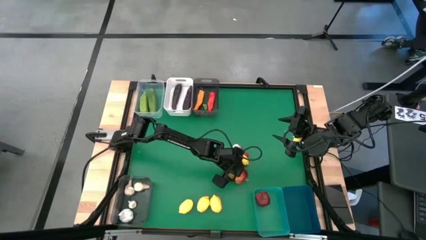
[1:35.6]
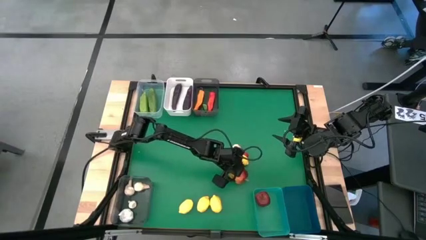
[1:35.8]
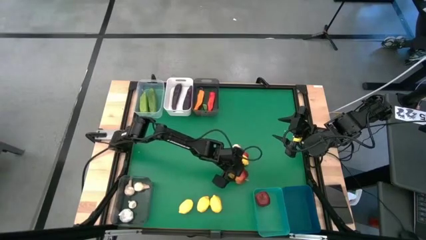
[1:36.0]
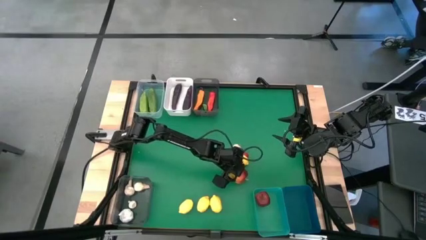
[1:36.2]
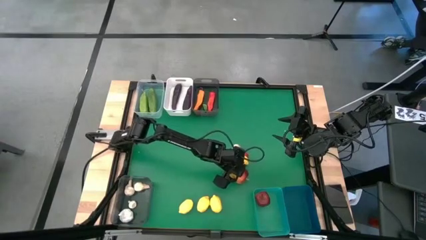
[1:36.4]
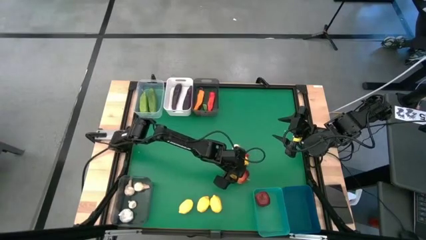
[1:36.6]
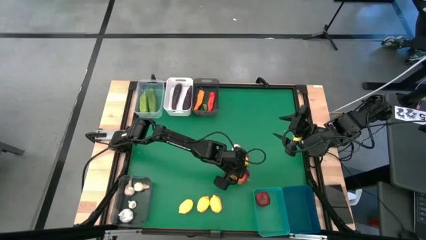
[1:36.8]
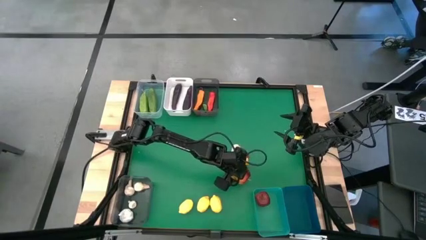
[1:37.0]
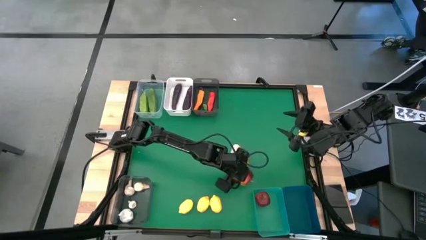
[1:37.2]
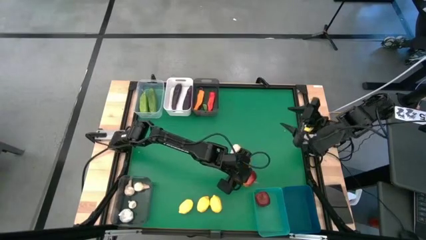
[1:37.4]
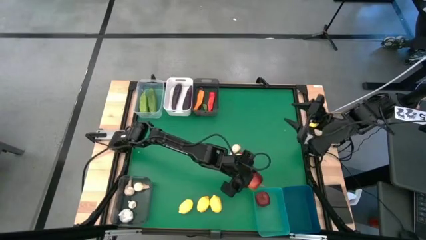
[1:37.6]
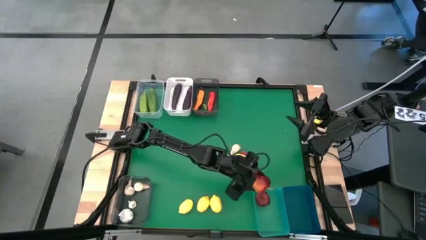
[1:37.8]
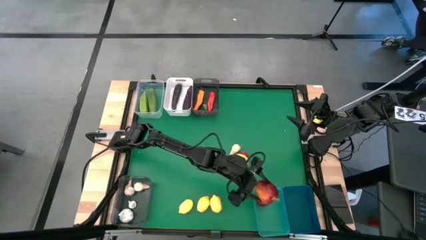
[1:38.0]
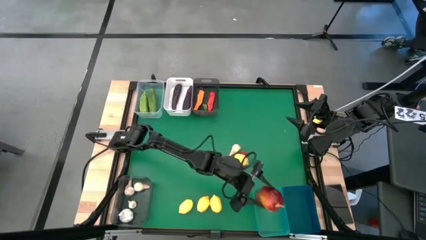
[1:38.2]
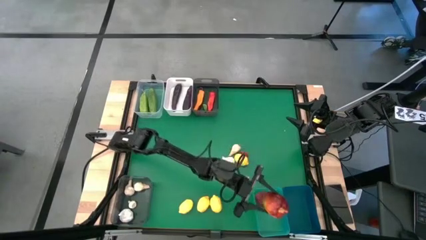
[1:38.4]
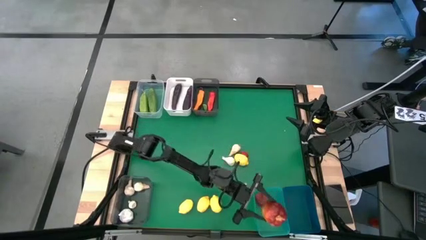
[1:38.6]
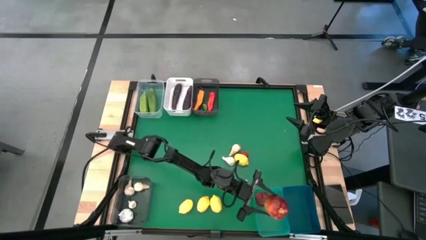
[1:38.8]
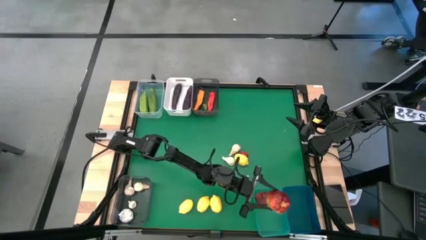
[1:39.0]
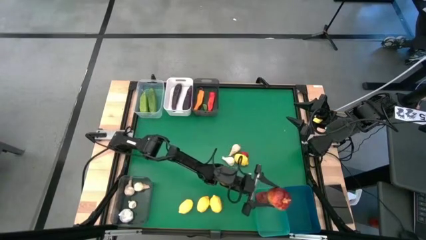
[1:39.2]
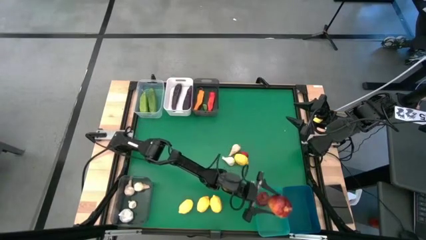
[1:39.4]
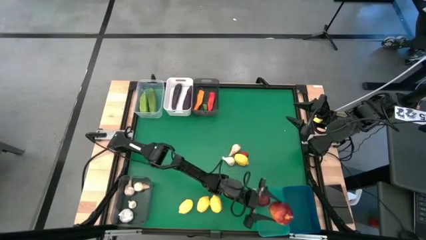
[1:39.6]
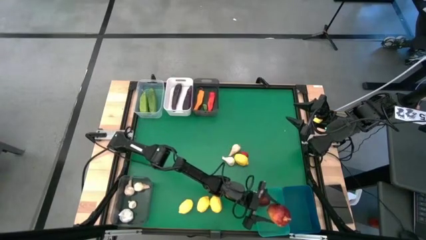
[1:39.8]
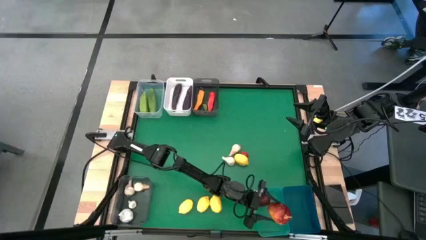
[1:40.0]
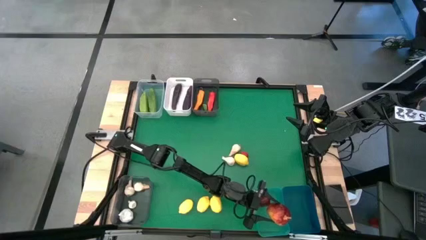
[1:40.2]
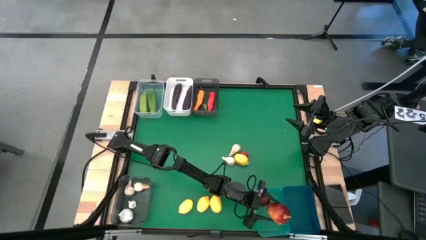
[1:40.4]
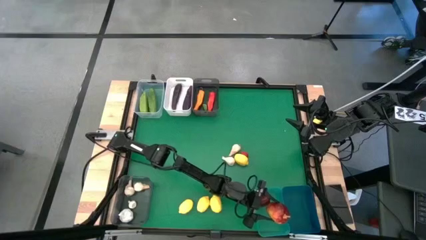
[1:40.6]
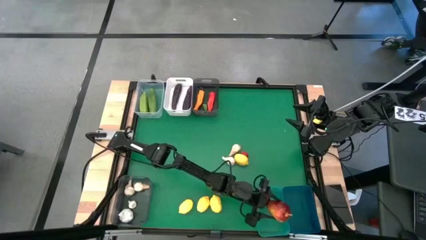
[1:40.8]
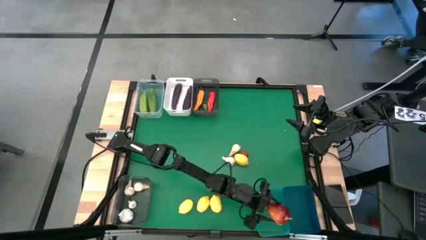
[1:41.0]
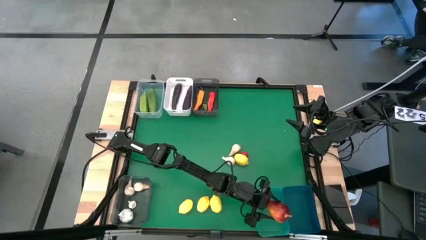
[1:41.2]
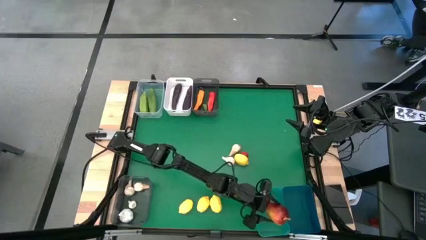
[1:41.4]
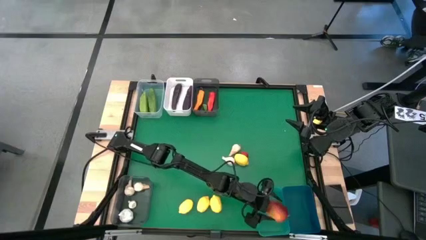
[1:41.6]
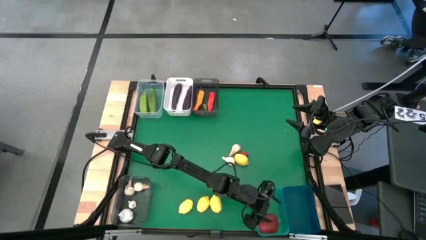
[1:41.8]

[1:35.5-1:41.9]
Task: Sort produce into baskets
Put the red apple into the green bin

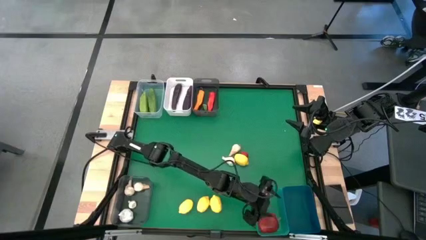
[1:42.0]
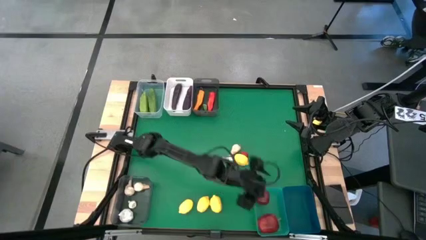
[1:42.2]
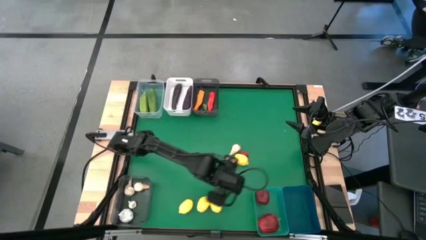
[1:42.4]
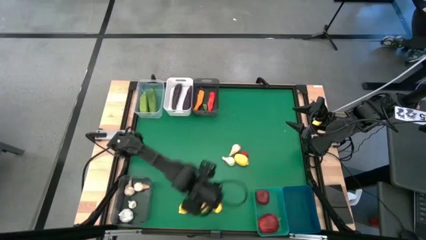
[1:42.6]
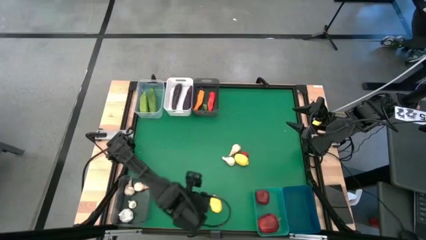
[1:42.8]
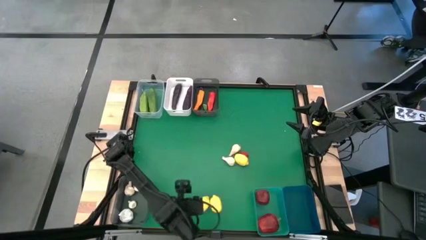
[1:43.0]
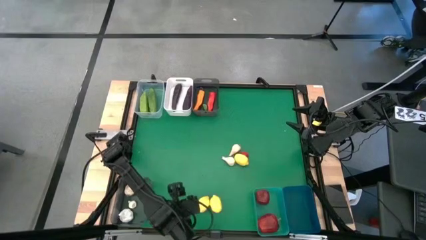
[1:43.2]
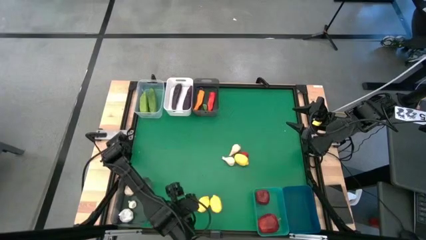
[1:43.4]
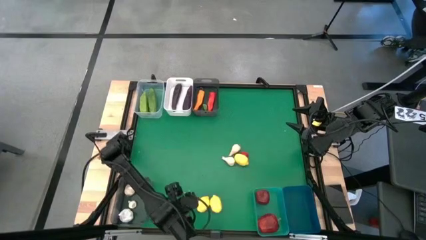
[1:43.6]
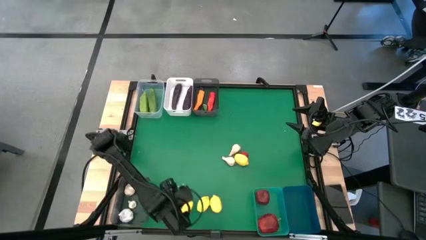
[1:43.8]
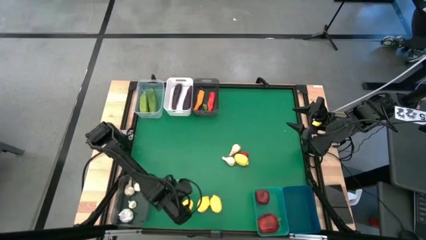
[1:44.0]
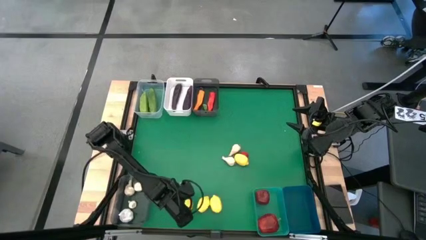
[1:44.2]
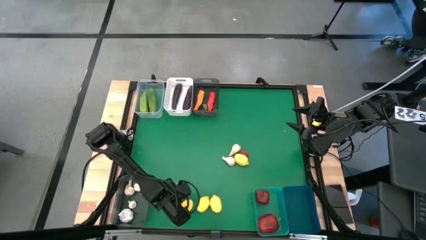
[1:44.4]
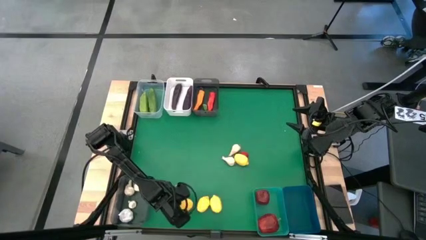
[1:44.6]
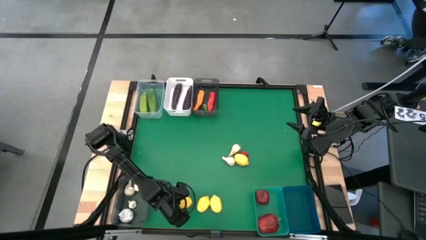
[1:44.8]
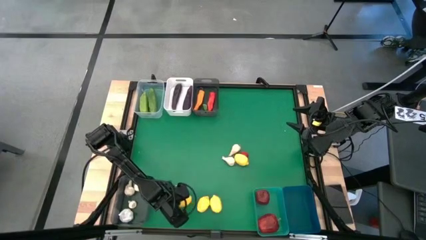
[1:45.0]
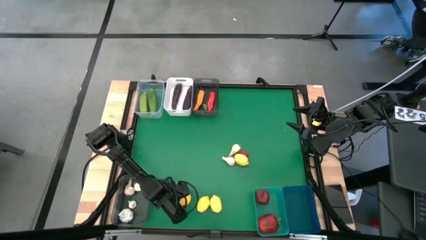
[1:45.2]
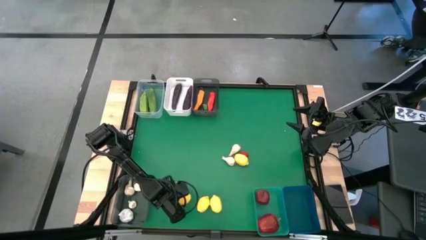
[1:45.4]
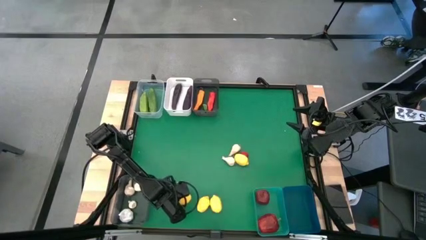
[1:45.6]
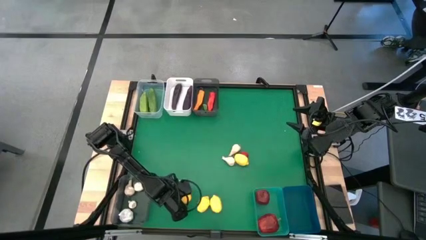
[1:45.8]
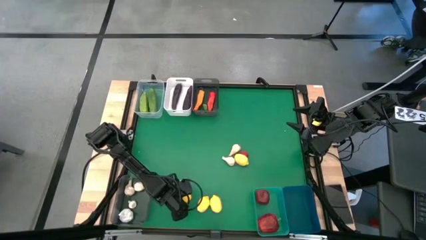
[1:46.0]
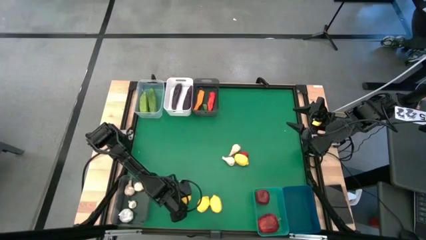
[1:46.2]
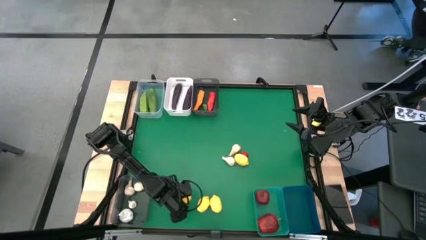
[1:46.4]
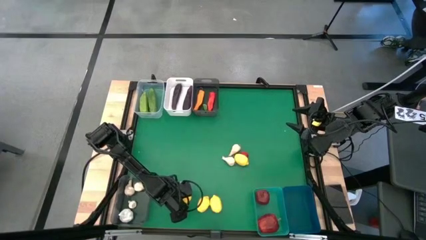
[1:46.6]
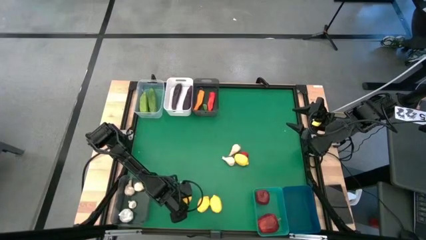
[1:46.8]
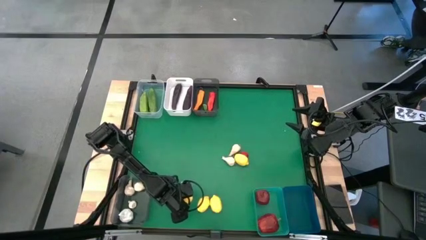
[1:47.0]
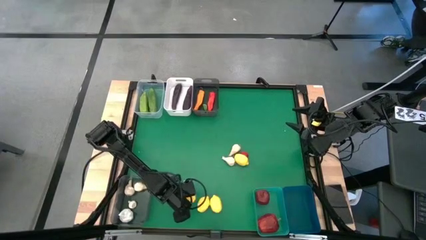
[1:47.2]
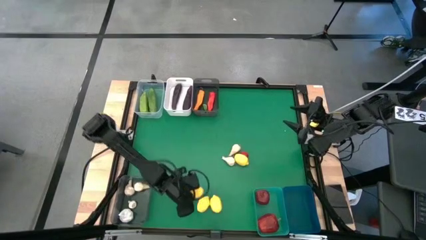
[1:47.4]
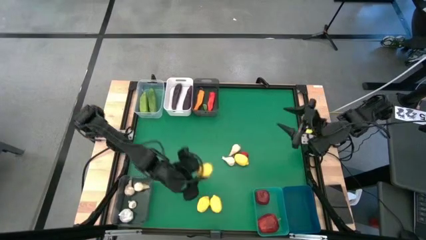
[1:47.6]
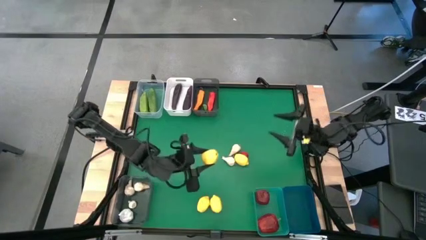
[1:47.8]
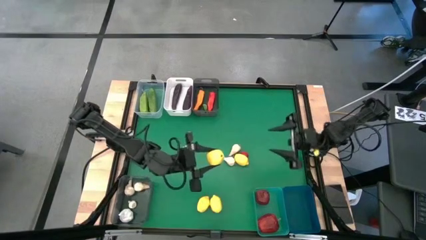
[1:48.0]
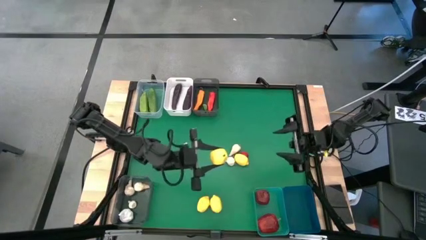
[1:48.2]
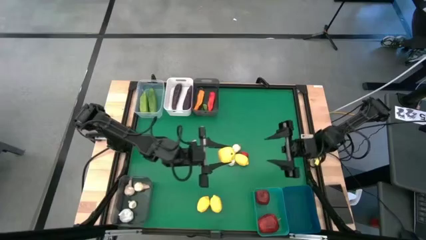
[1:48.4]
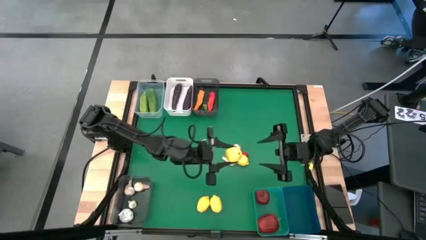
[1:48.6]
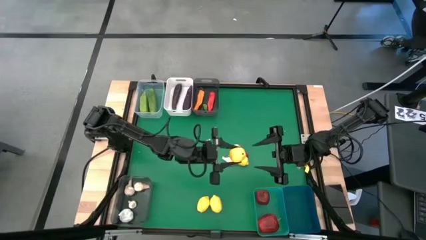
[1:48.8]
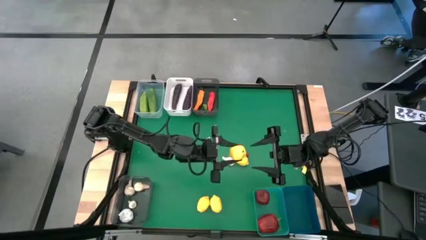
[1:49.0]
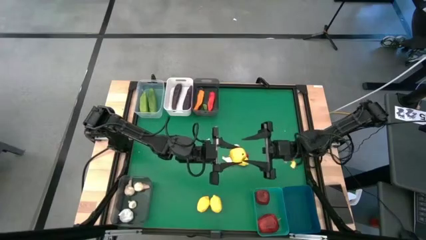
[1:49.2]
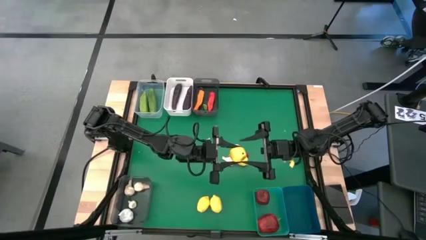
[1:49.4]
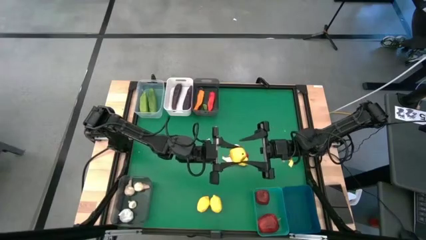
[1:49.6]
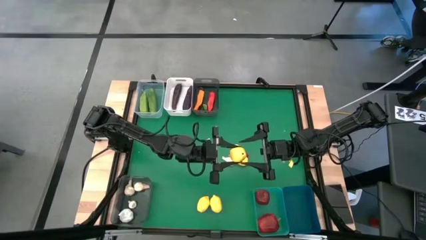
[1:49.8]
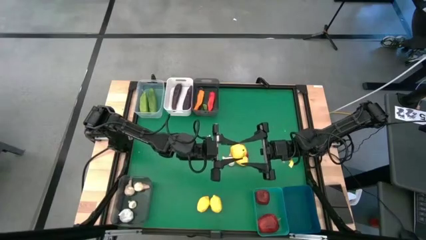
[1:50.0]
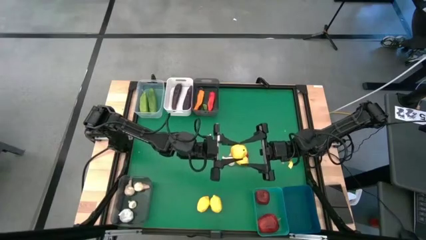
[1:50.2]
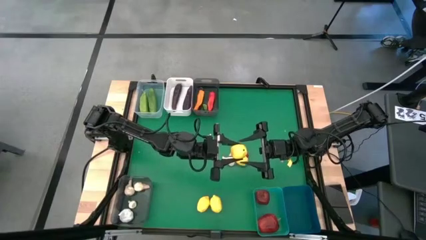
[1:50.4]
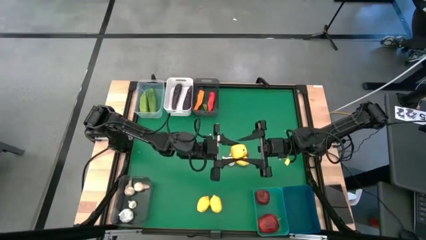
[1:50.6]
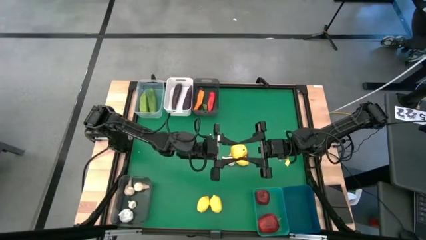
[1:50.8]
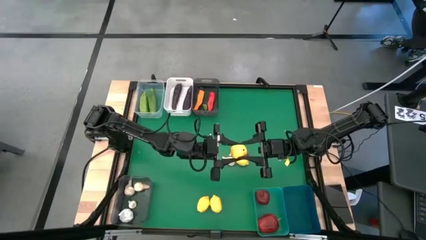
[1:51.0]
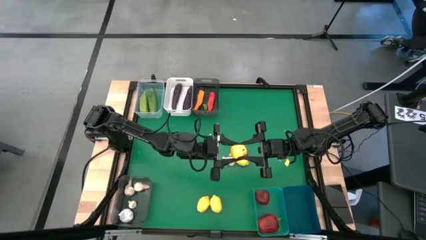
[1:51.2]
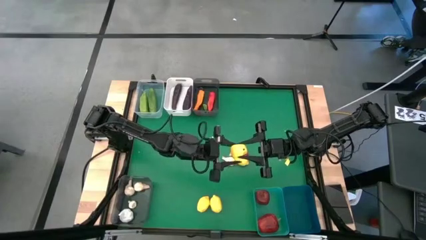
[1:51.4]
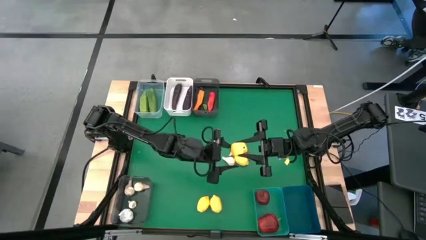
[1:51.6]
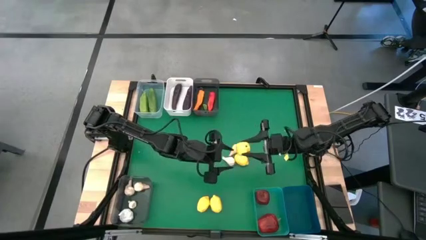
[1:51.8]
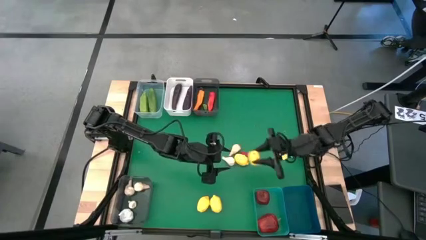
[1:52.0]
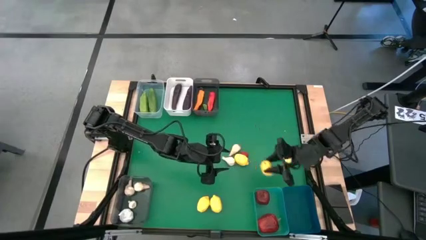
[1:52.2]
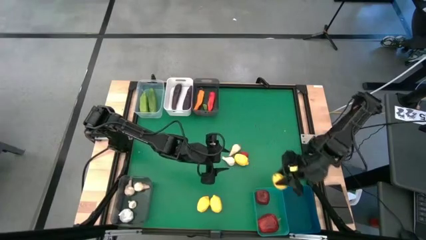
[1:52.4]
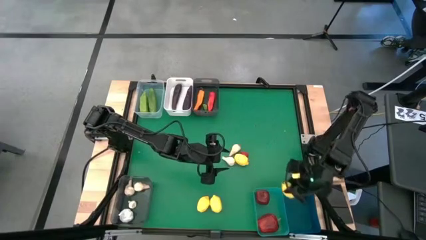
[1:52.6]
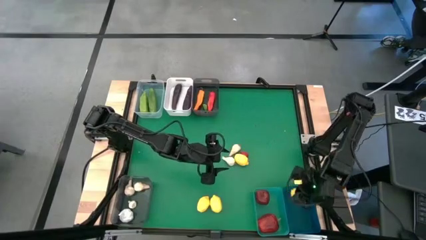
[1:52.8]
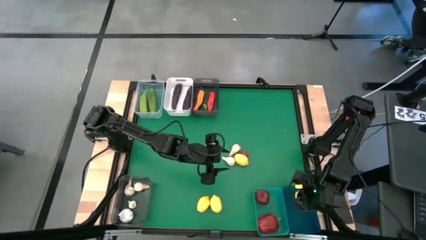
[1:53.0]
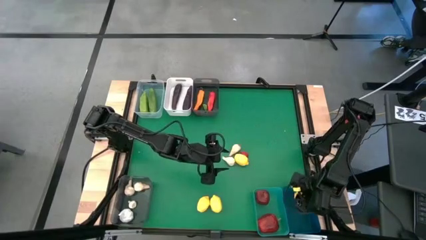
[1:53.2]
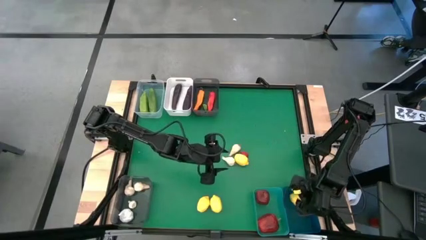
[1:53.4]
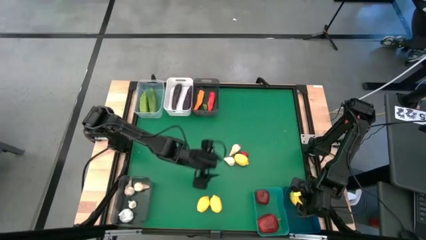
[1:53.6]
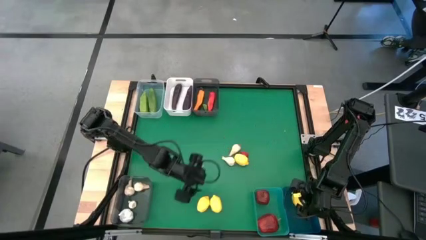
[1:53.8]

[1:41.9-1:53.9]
Put the lemon into the blue bin
